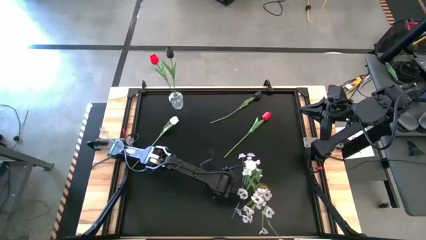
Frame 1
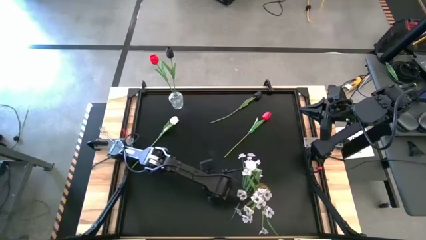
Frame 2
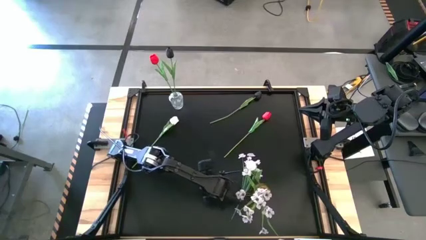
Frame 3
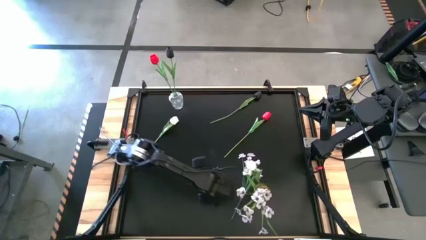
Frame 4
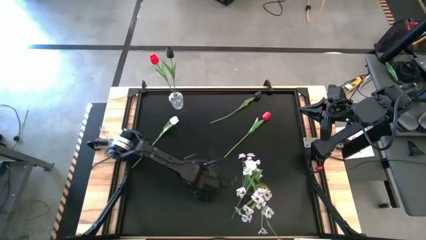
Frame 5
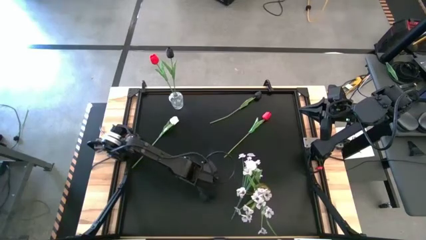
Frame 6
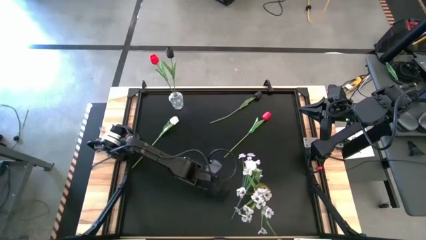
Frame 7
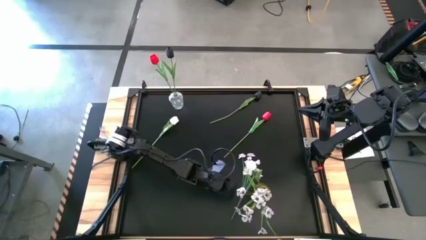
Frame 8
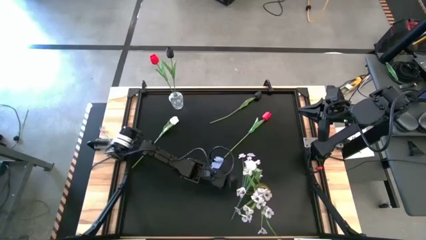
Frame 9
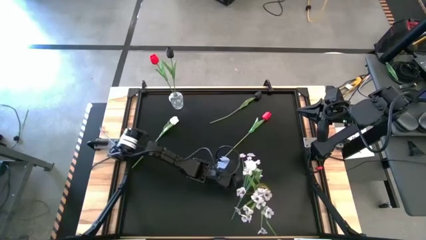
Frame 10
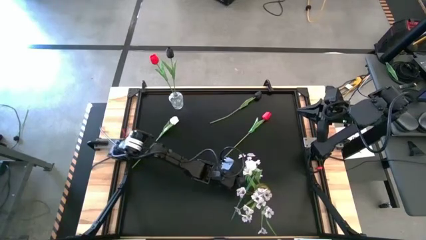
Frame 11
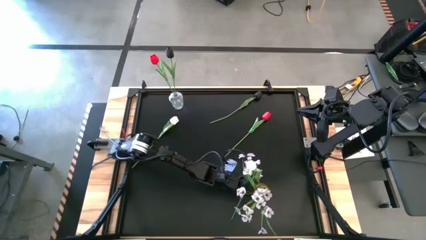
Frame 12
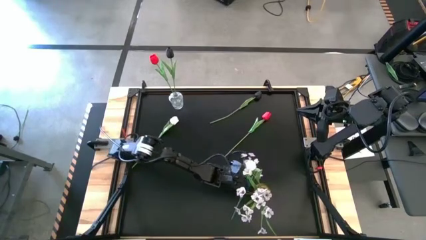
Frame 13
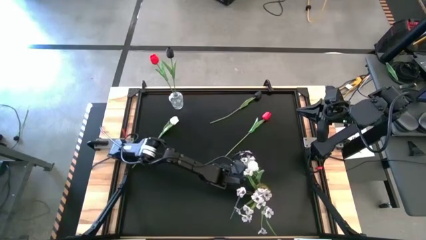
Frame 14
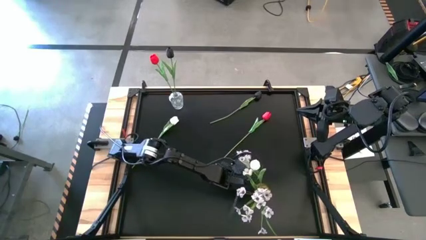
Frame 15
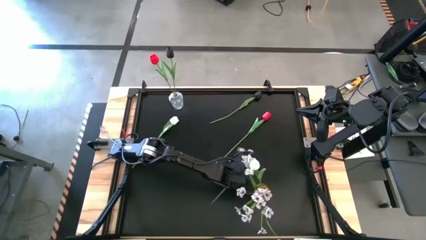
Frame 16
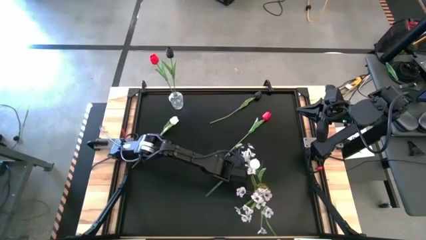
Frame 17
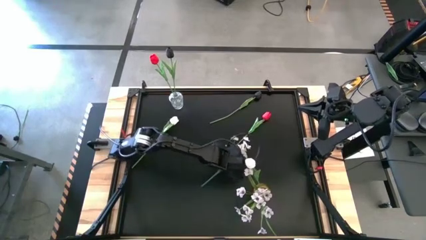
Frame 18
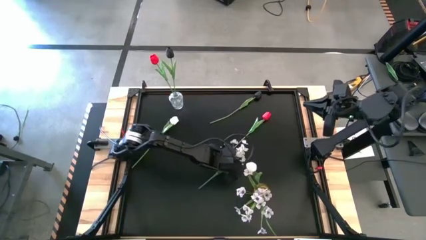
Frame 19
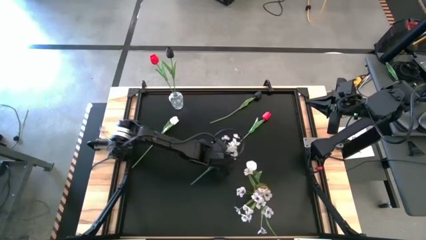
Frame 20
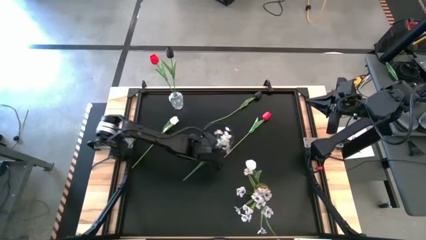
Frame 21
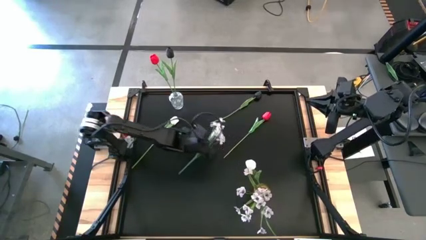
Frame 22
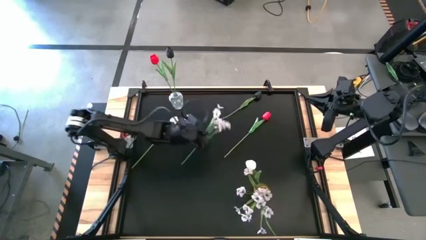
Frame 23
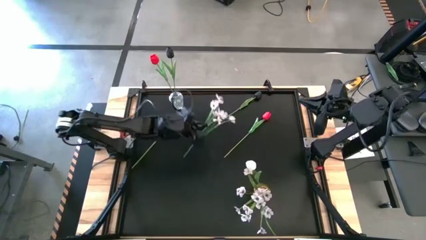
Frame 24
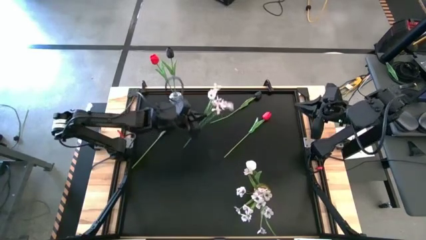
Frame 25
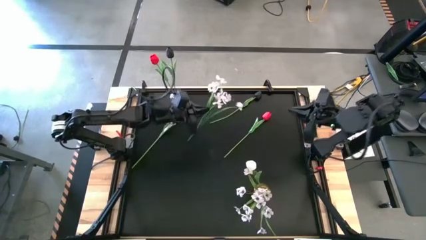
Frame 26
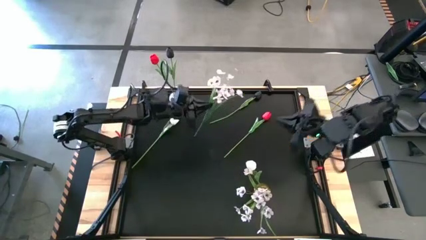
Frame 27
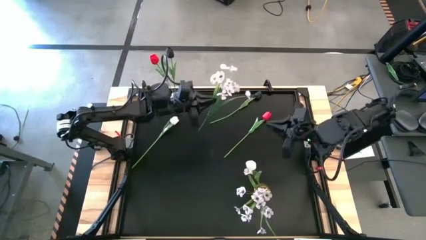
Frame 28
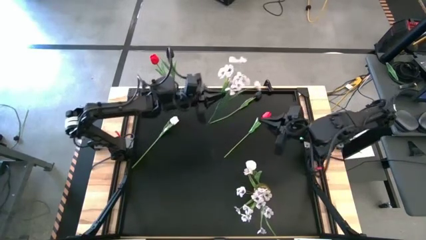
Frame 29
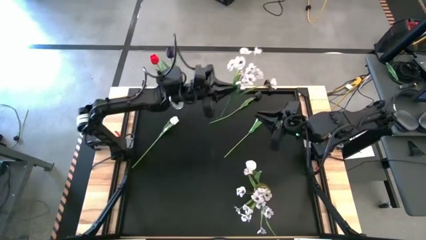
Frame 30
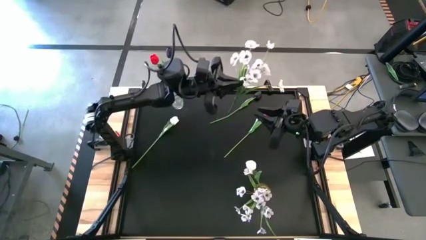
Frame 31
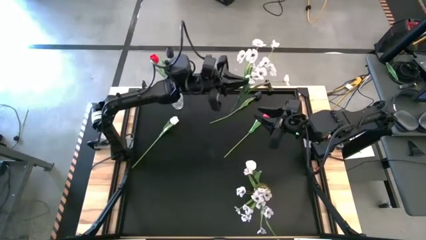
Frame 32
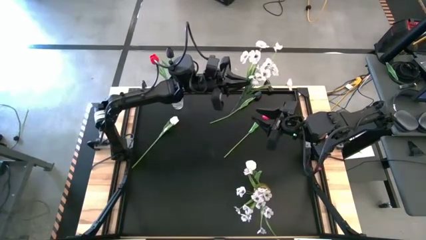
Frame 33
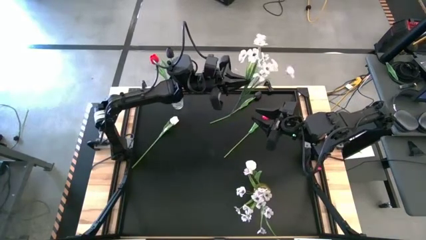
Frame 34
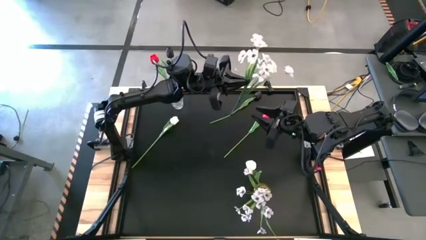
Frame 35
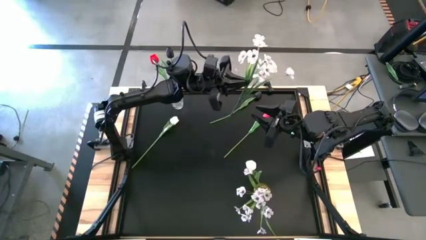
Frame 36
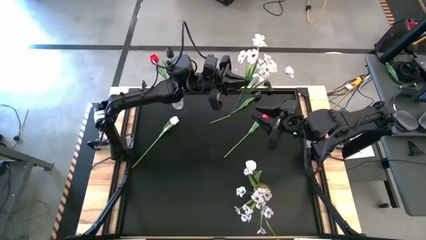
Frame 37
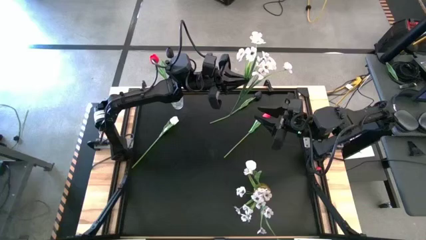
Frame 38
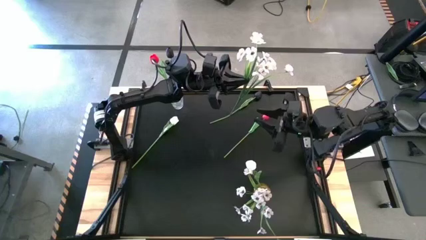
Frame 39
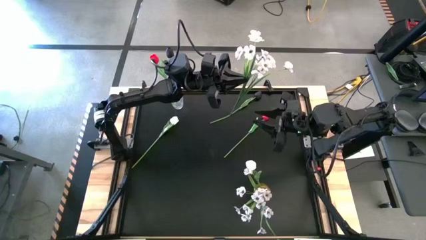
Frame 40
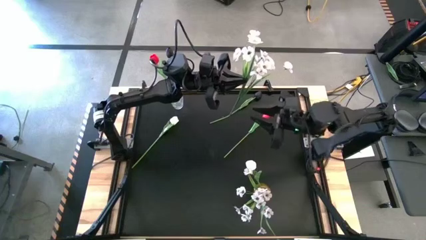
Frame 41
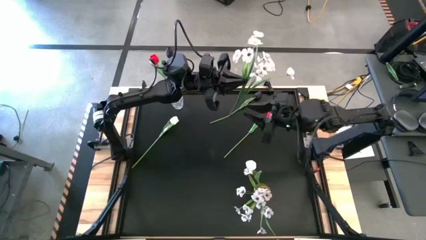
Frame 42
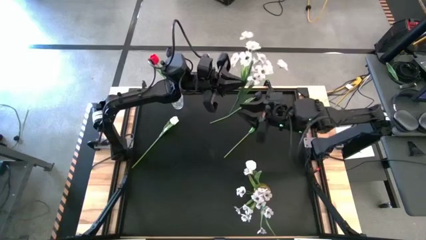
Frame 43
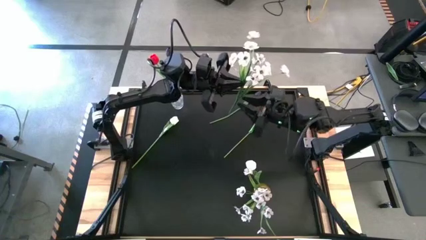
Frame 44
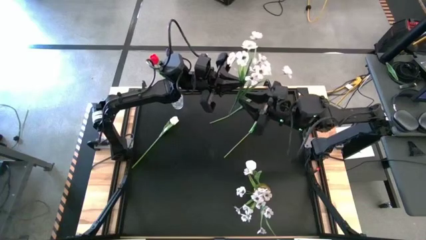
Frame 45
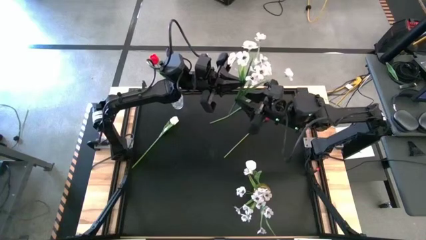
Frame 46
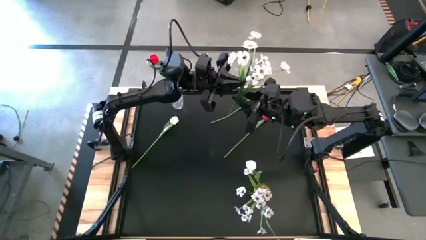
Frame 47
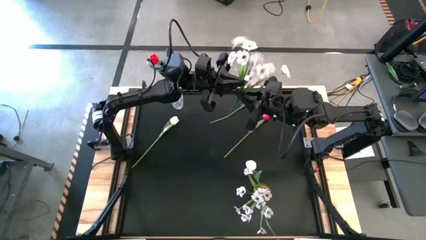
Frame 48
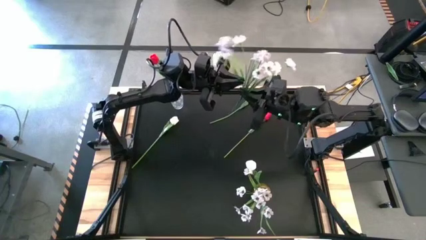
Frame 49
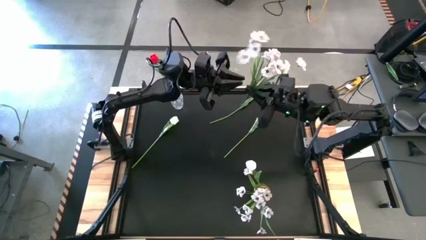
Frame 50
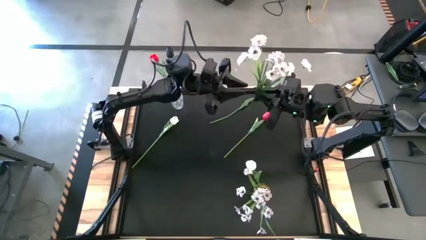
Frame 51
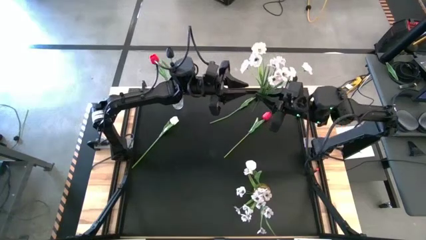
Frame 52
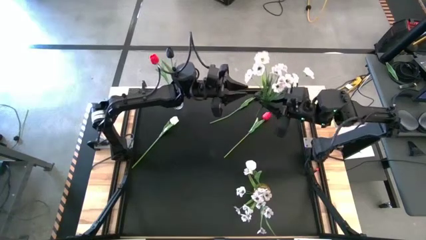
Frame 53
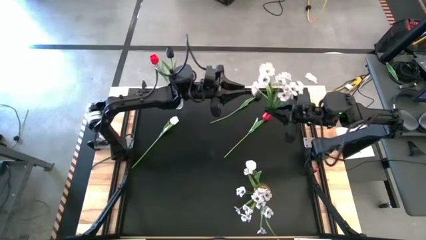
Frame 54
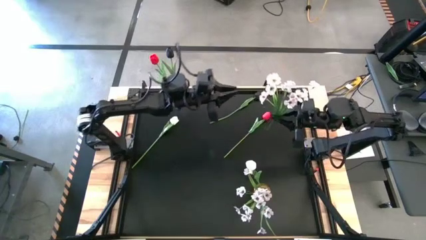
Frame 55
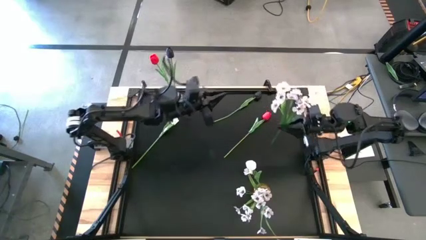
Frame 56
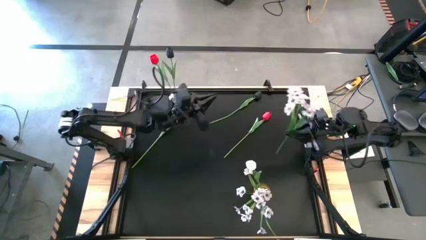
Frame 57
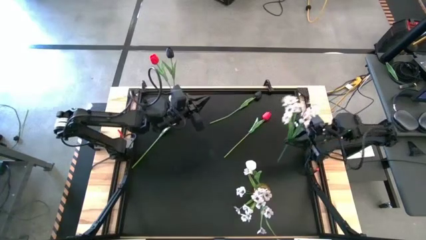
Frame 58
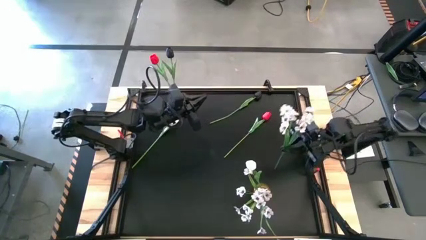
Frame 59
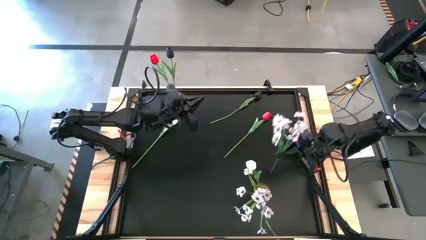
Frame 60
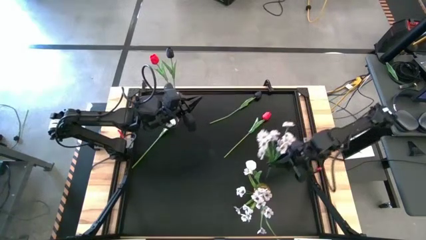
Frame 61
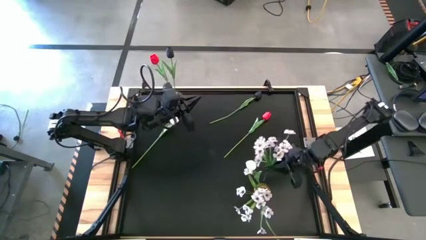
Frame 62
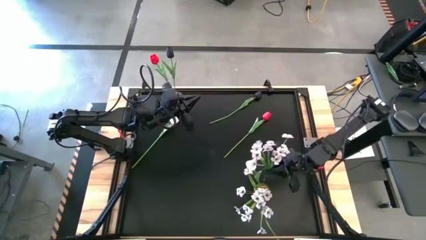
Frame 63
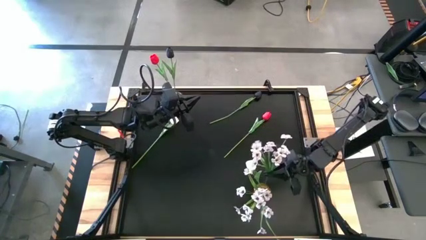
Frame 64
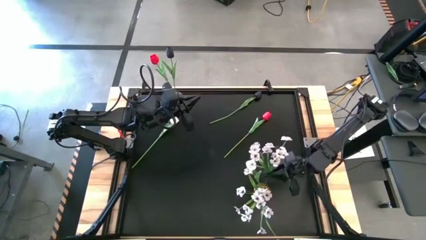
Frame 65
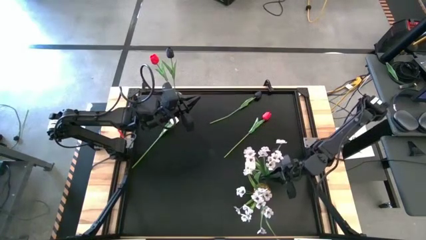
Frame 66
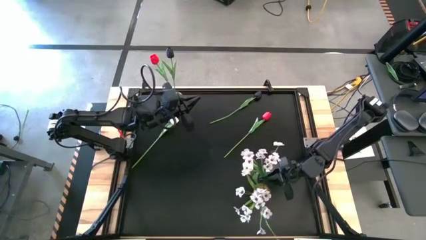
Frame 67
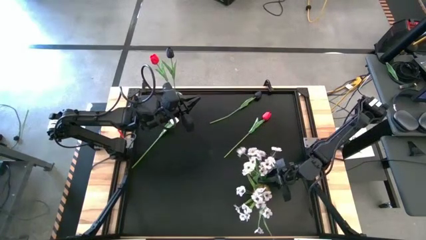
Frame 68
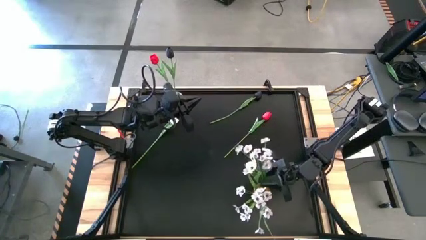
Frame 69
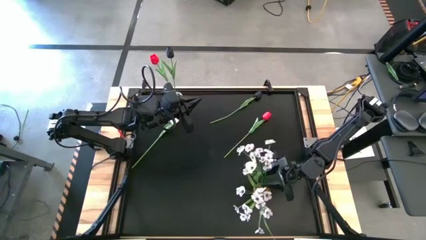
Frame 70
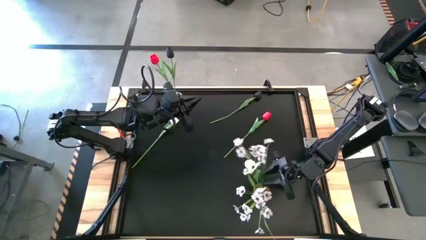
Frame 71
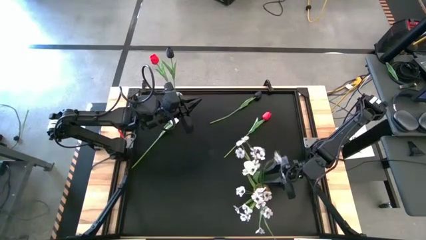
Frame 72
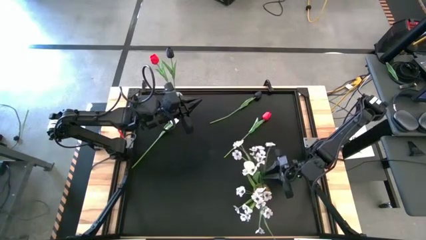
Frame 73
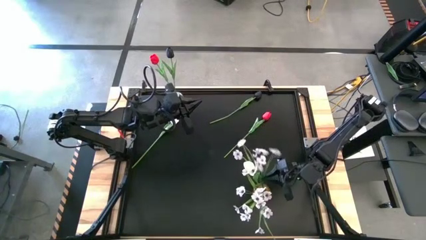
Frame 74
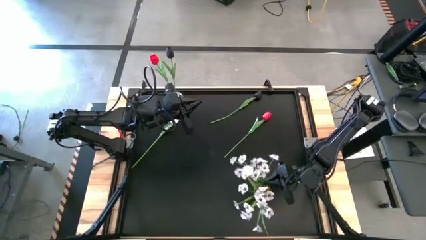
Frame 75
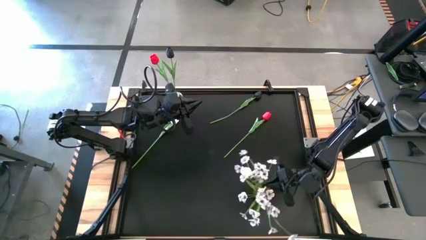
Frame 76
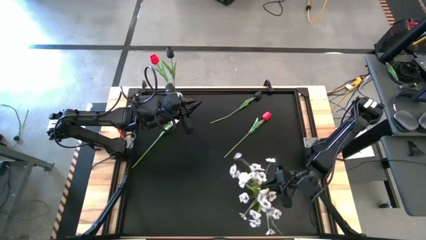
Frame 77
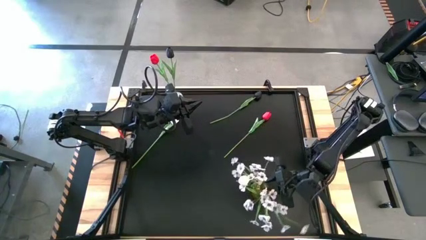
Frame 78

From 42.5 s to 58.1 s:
Task: Sort flowers into vase by color
Put the white flower into the yellow vase
